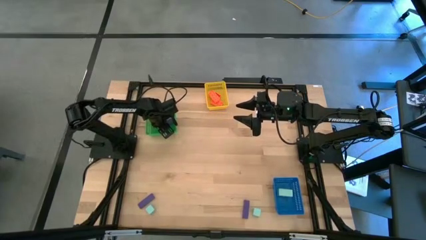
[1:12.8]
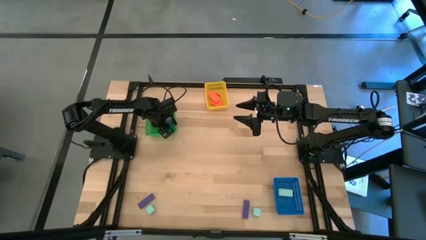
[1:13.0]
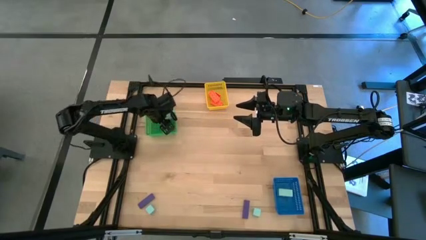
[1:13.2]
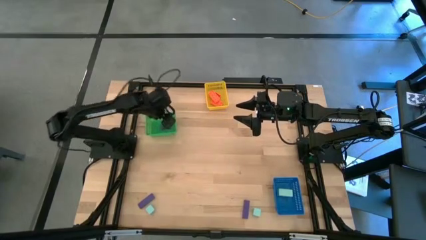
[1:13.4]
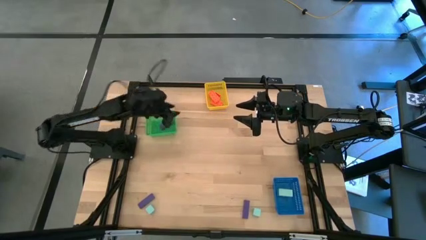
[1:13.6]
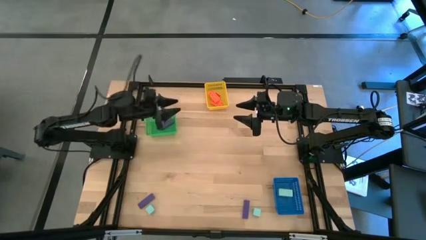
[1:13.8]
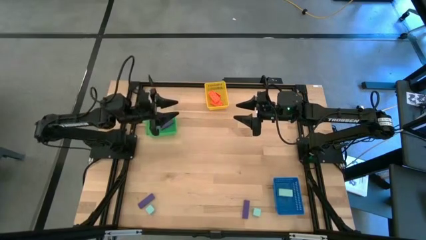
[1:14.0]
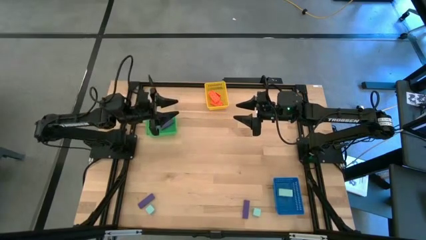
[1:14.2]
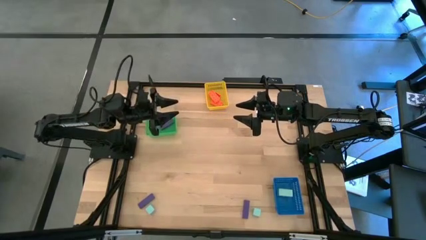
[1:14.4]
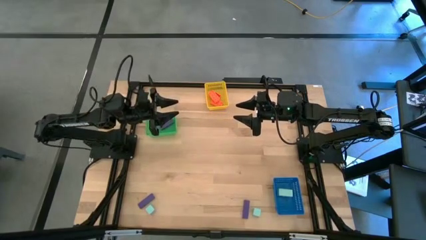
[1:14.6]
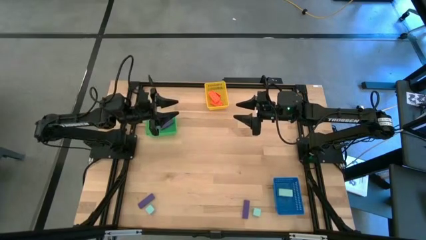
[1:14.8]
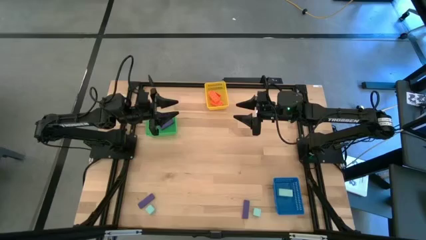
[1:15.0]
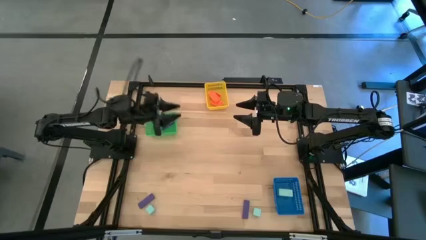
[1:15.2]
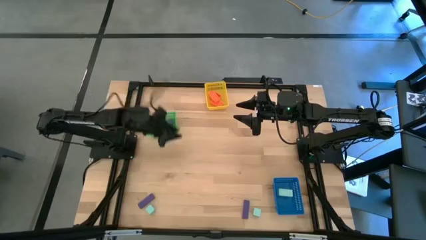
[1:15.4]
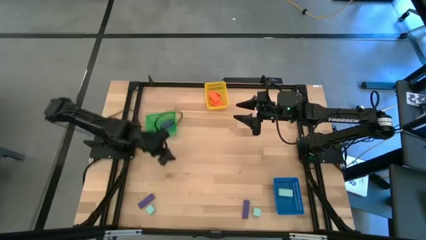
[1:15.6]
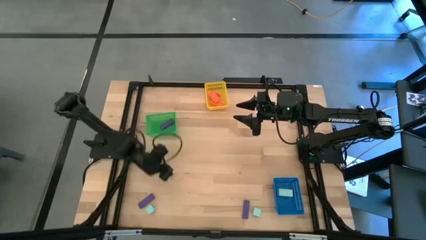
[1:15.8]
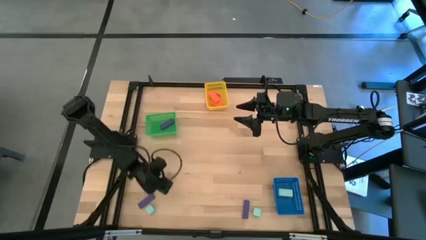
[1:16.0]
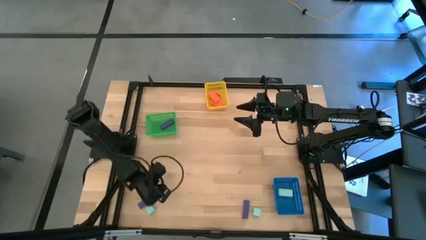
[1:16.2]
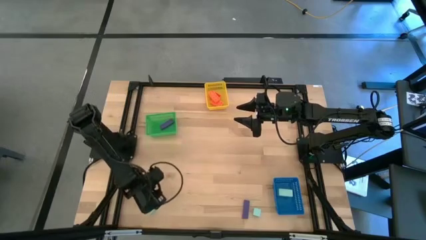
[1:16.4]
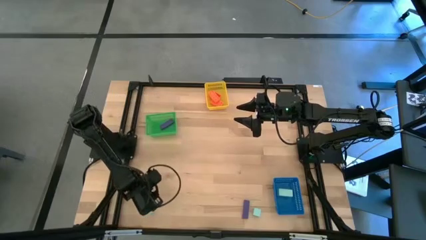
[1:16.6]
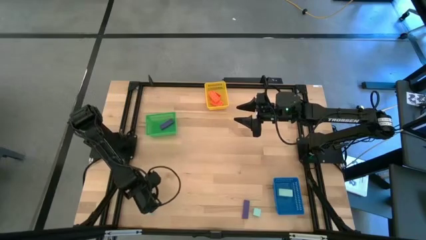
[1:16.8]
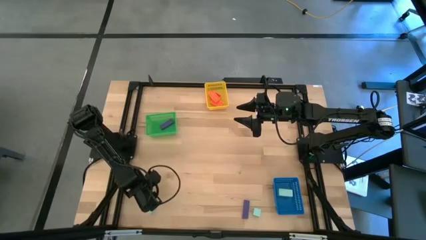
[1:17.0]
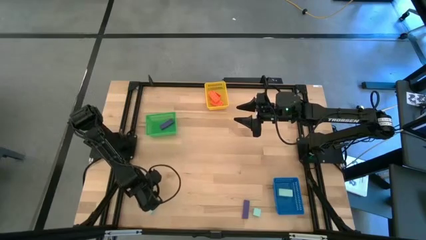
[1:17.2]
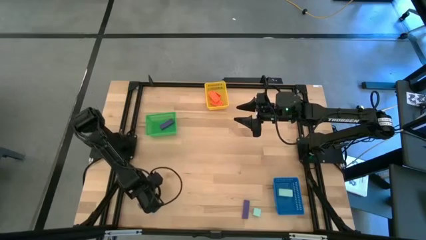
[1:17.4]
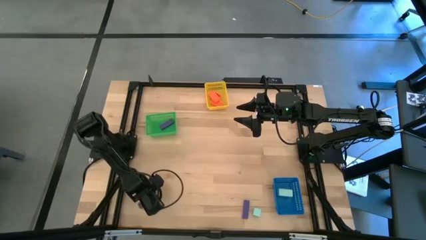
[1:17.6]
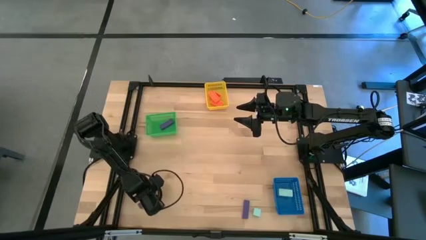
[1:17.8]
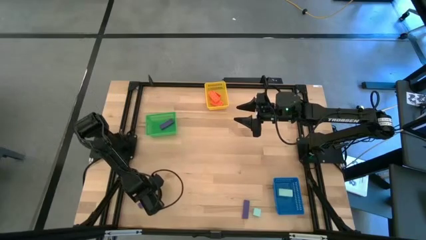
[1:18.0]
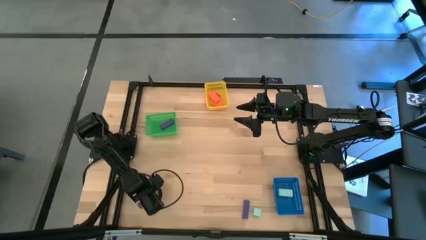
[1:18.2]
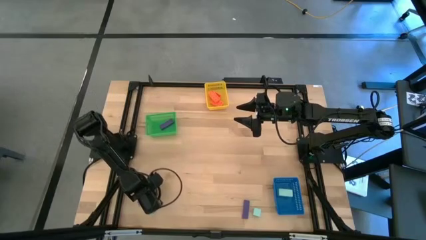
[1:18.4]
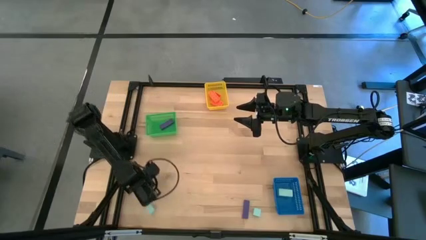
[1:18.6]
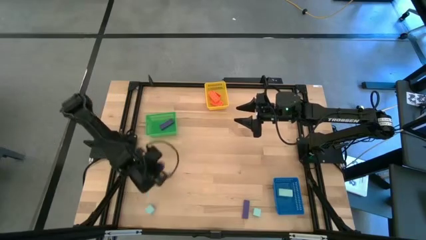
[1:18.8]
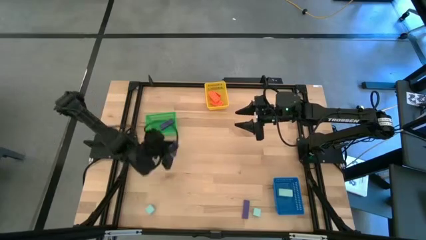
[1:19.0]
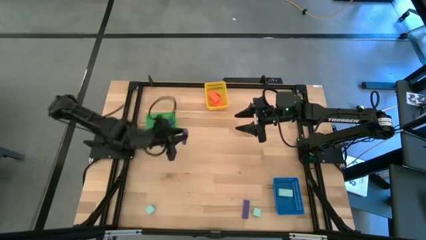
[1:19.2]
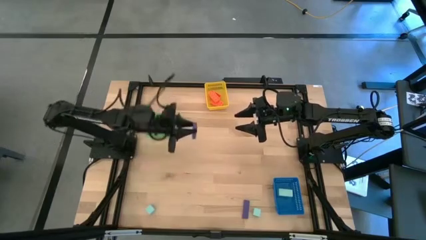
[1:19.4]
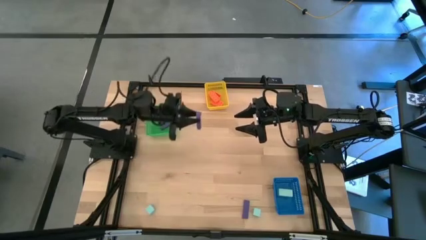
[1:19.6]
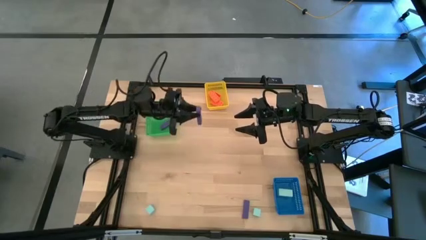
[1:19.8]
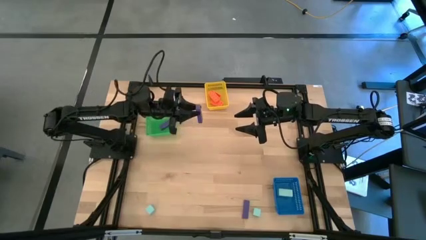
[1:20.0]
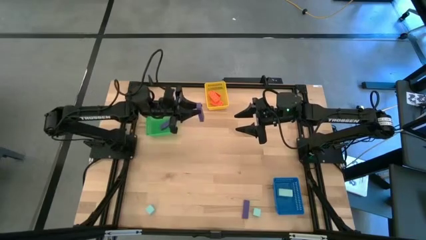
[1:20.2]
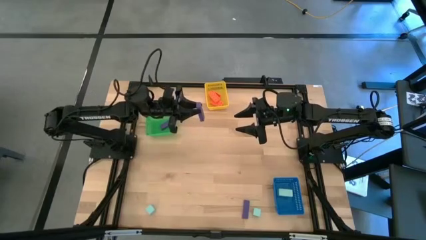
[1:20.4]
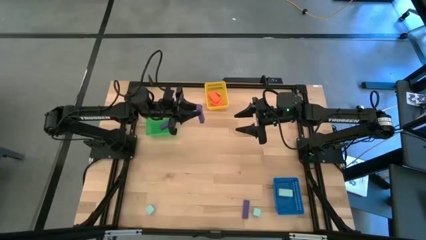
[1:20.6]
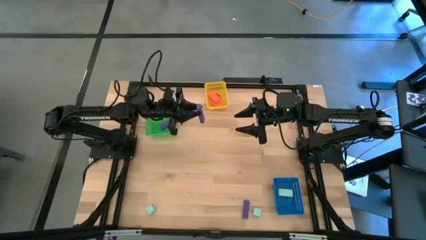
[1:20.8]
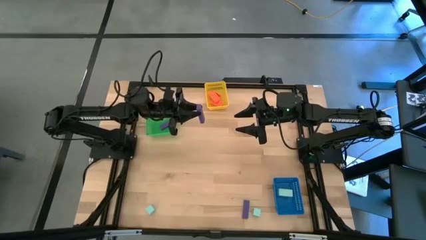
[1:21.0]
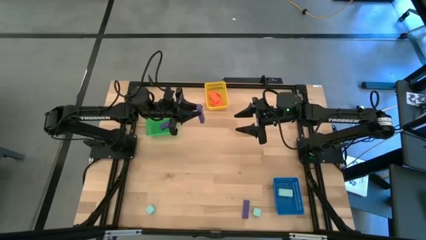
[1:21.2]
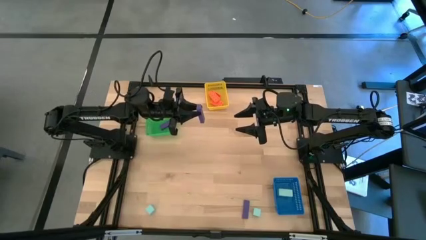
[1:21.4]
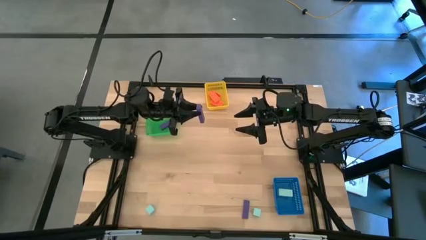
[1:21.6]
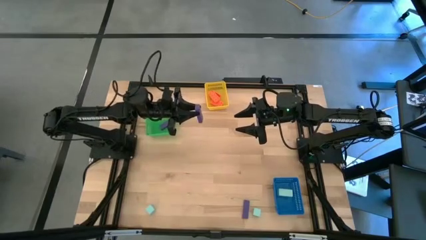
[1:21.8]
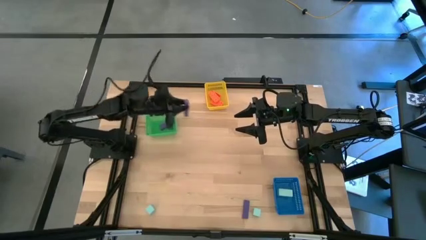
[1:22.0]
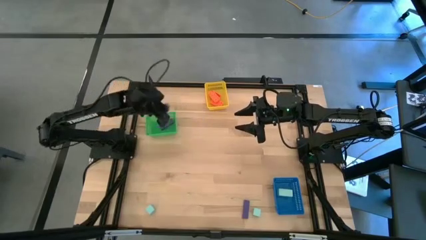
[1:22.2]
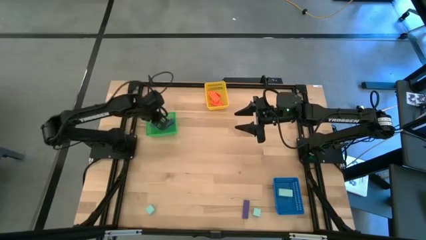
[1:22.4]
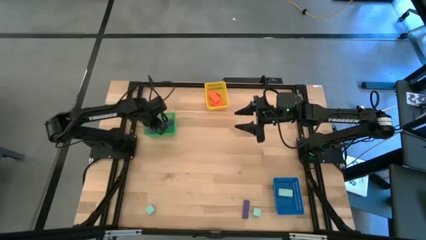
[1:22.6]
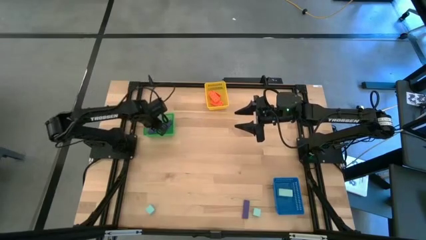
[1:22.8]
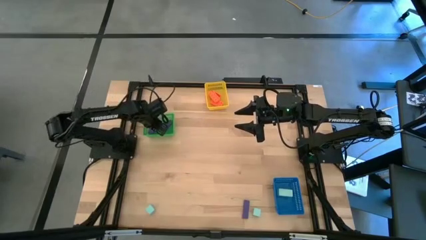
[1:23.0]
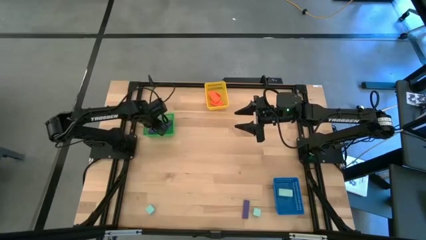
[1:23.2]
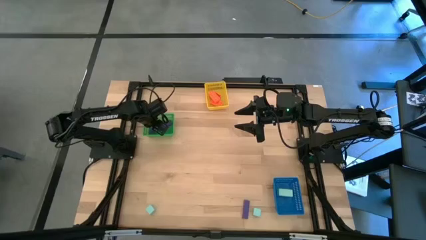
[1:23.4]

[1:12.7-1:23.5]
Task: Sort & place blocks by color
Put the left violet block into the green bin

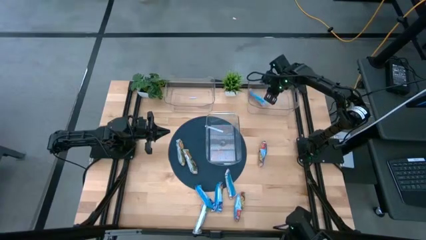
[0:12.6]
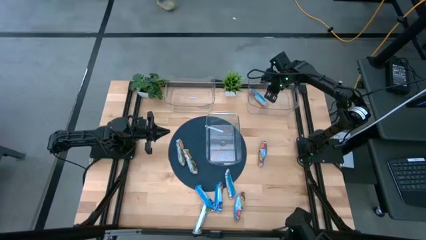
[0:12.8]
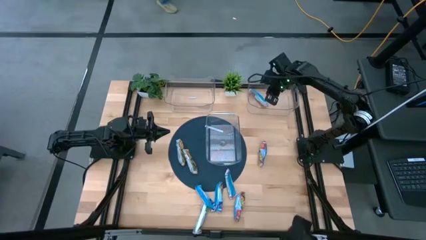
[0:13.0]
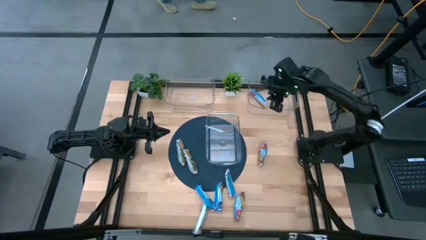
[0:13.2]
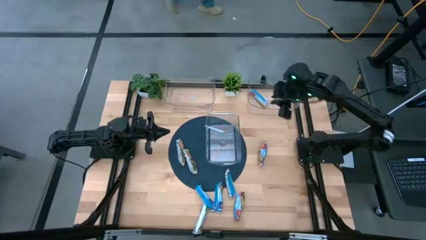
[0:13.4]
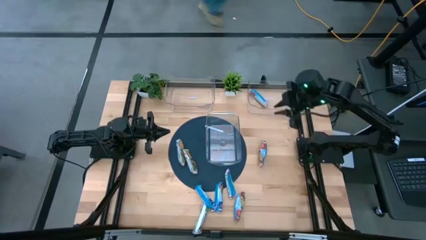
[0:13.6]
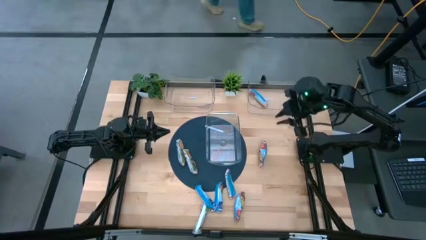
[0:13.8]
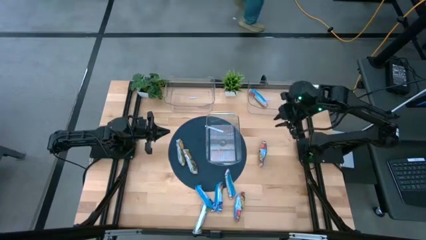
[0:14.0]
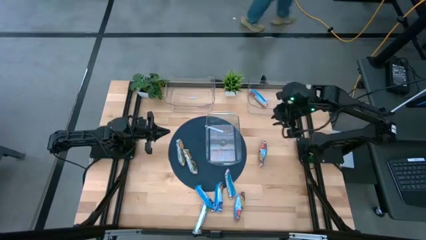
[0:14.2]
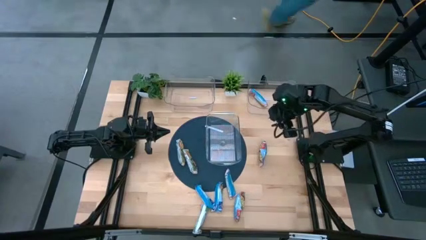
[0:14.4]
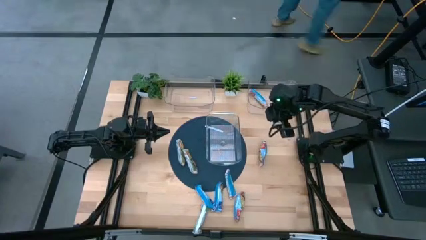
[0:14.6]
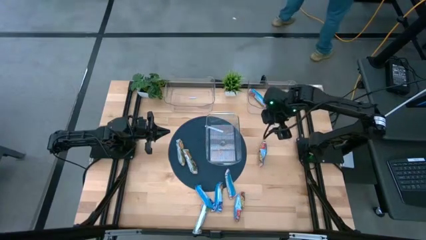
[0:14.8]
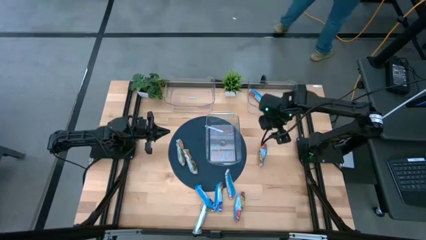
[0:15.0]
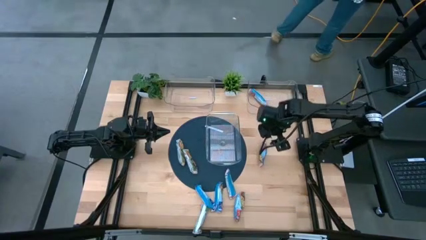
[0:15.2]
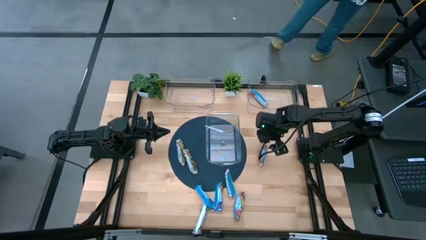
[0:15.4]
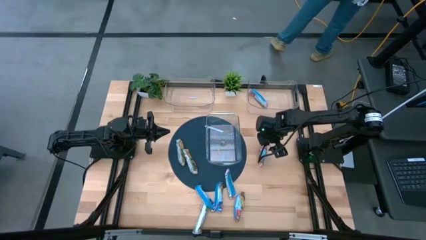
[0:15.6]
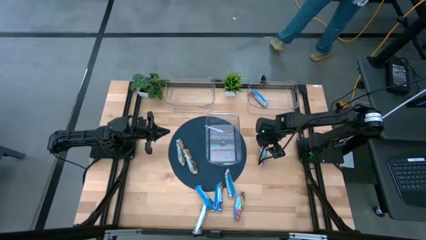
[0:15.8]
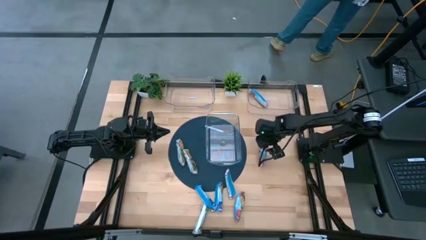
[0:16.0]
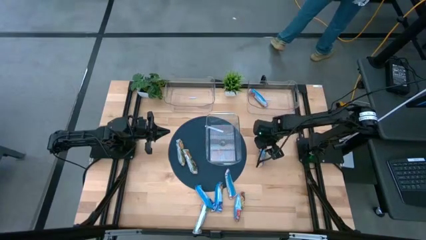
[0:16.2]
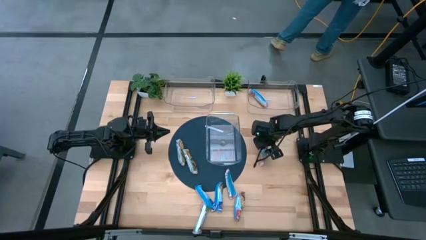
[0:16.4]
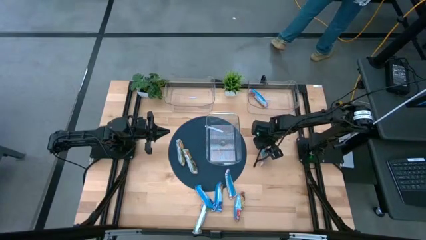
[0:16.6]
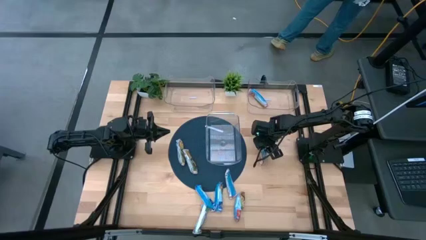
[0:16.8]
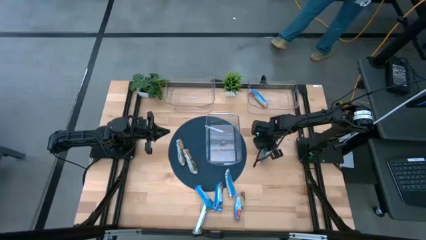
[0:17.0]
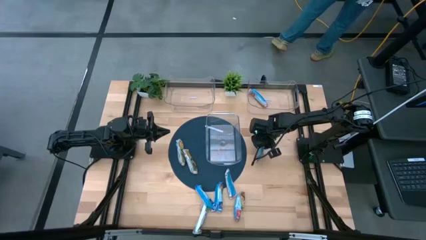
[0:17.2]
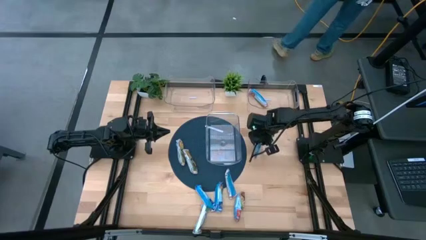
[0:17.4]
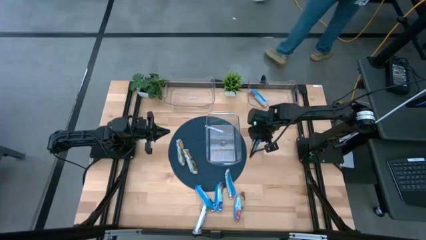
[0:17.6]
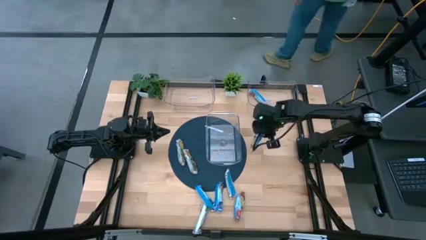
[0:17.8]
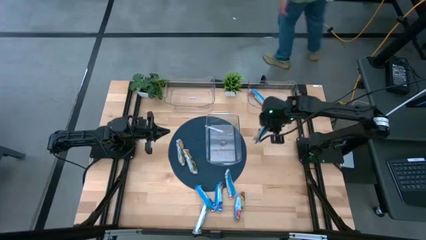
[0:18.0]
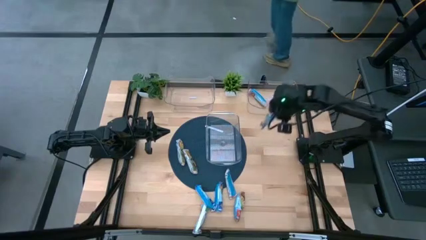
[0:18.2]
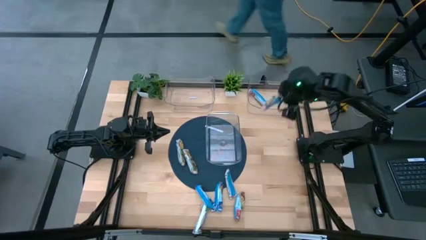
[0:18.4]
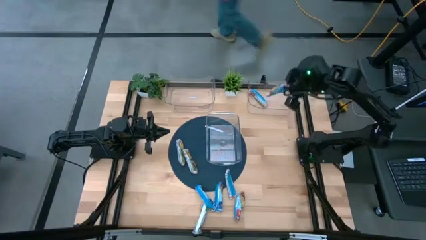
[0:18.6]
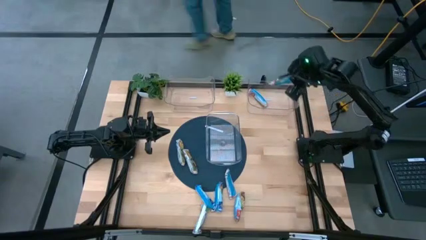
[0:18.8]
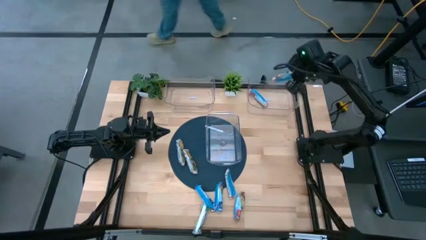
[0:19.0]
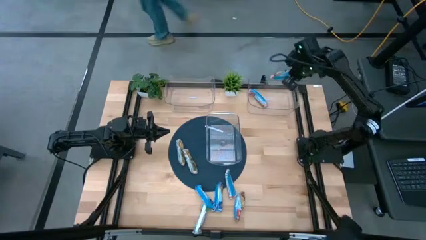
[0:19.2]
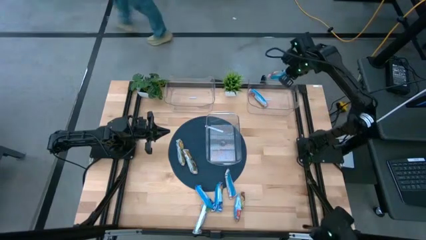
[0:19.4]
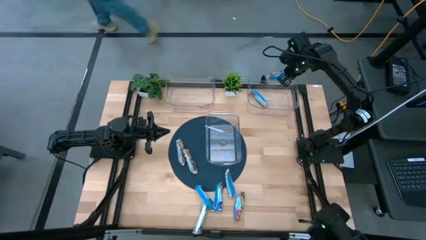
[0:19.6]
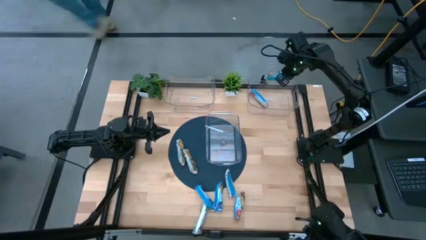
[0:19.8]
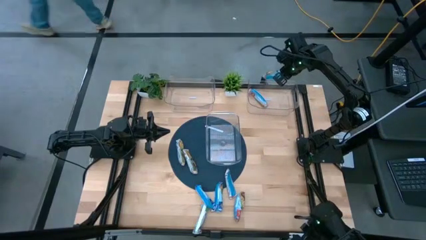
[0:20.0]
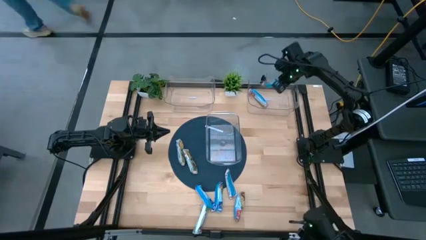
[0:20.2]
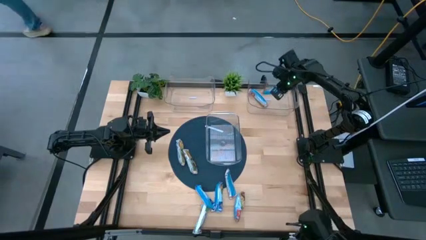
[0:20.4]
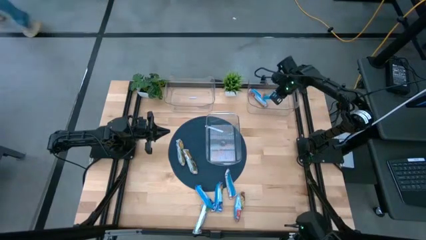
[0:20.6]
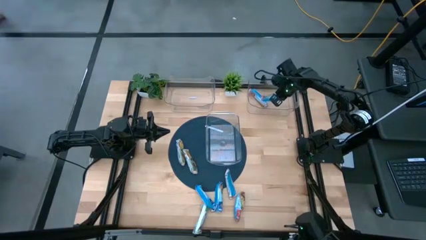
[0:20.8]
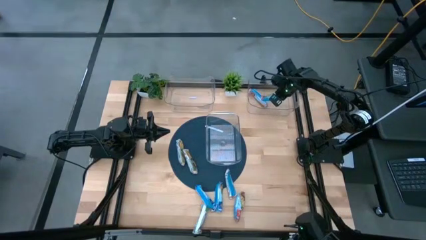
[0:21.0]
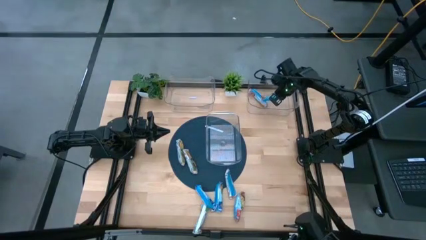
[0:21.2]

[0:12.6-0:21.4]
Task: Pick and place Granola Bars by type
Put the red granola bar into the top right transparent bin
